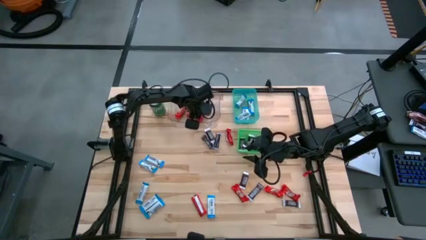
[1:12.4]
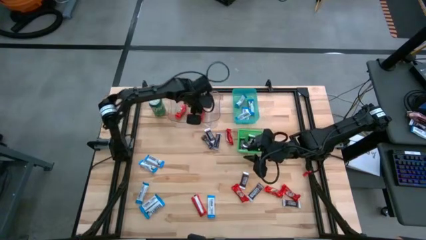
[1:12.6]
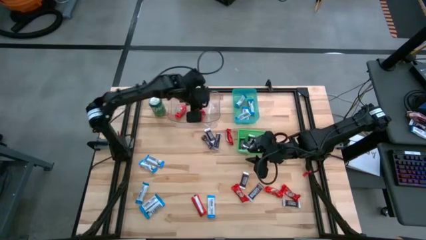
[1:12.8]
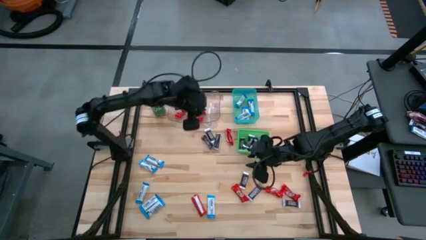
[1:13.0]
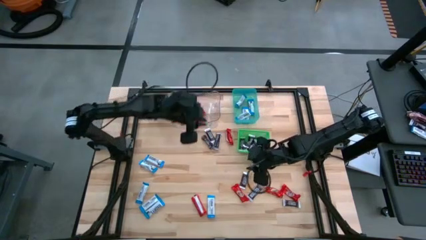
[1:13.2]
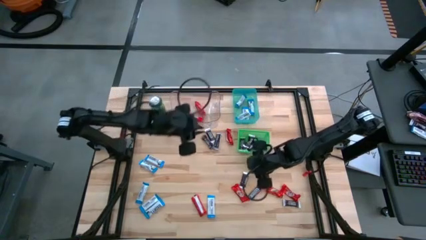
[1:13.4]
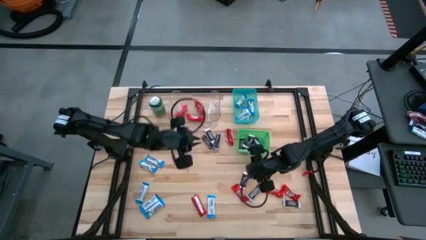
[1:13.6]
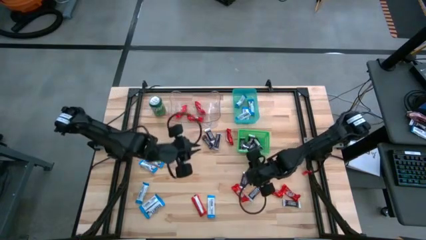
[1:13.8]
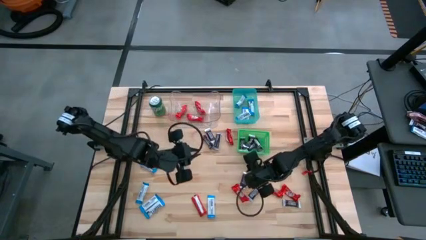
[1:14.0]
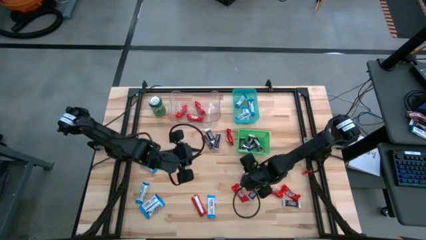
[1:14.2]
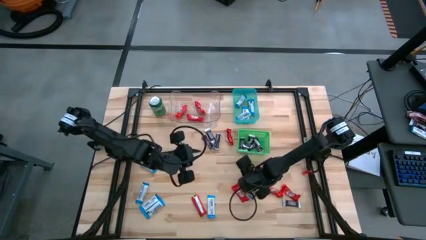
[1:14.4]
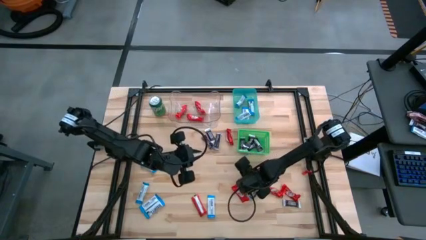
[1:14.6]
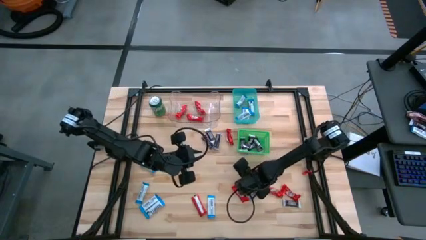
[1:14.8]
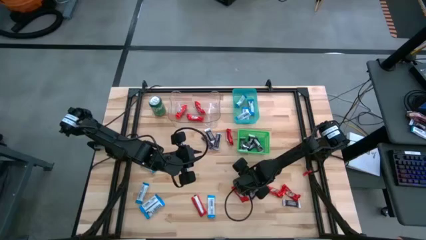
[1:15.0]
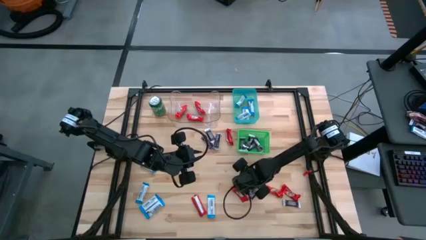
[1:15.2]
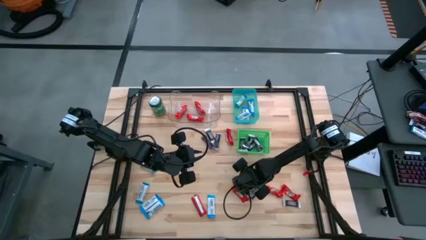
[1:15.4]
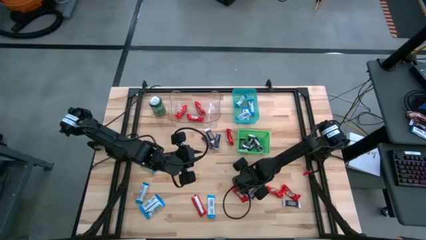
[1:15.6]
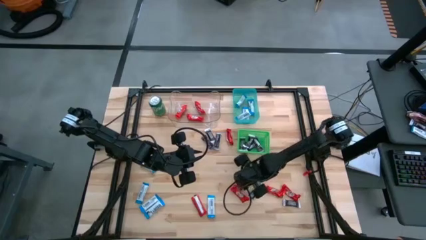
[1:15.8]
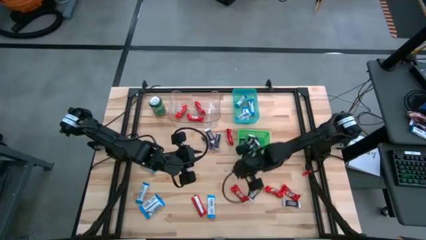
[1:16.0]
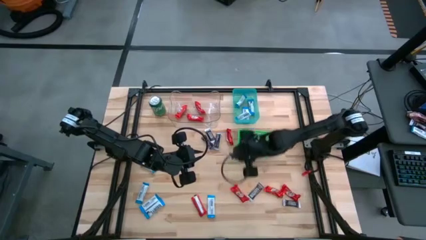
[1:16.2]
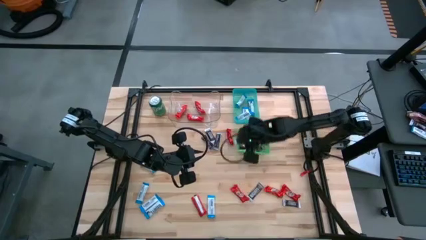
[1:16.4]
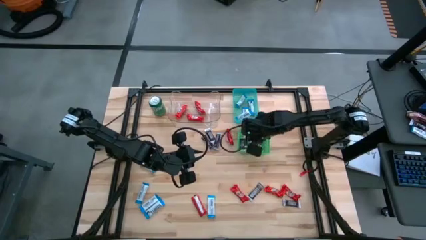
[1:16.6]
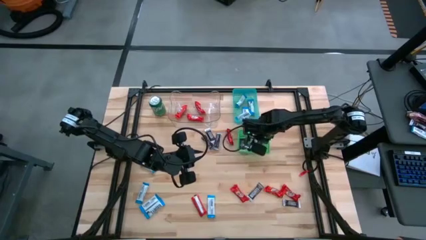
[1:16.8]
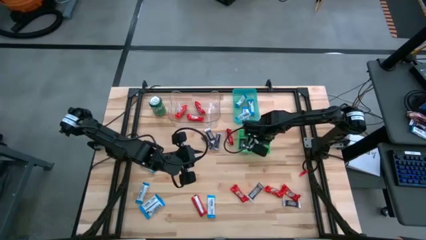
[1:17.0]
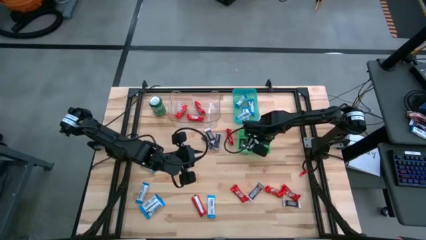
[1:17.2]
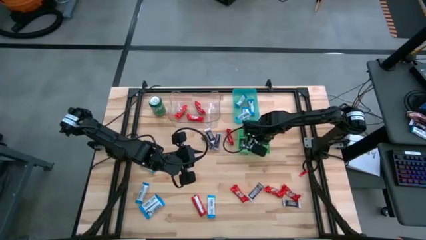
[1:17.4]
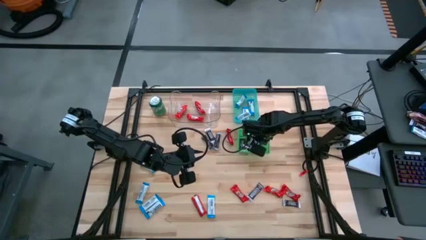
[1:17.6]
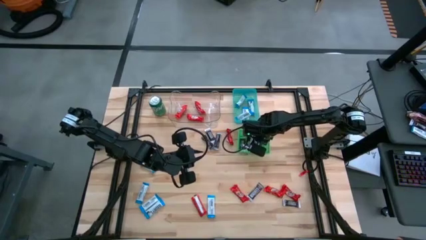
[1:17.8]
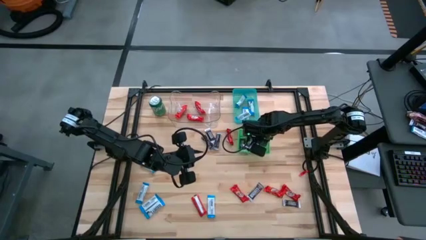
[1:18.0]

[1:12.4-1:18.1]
Task: Sort candy
Put the brown chocolate bar into the green bin

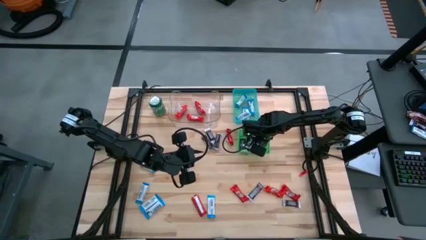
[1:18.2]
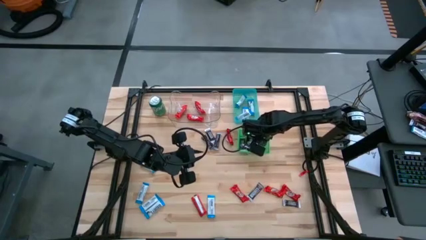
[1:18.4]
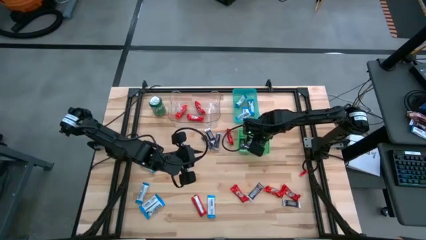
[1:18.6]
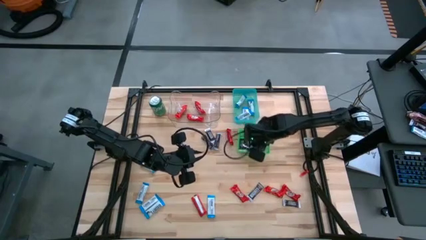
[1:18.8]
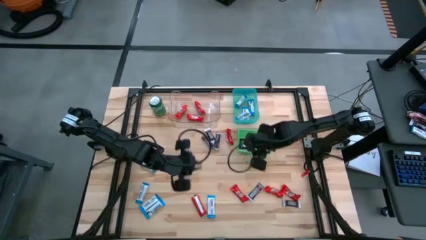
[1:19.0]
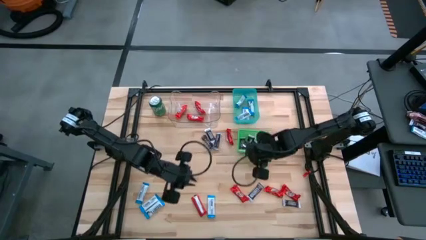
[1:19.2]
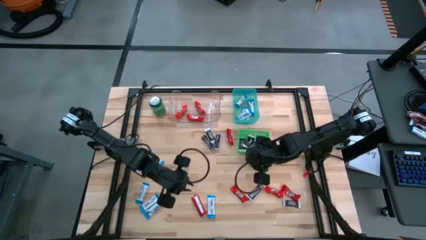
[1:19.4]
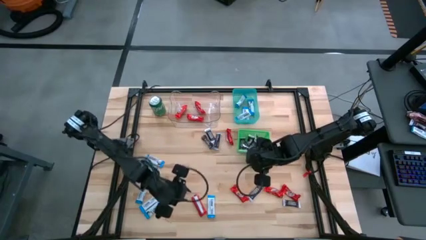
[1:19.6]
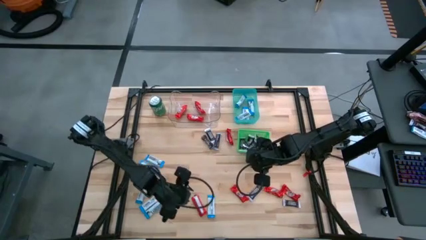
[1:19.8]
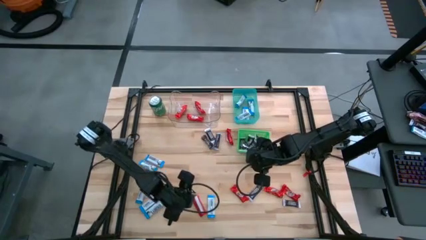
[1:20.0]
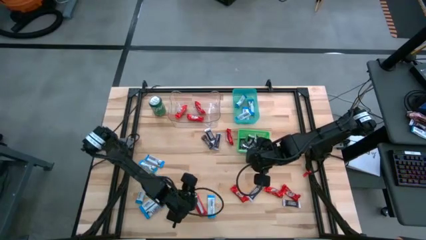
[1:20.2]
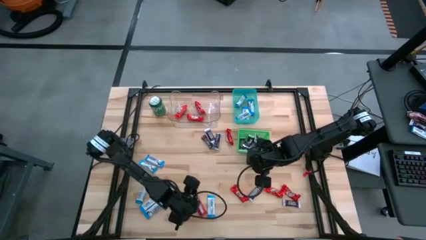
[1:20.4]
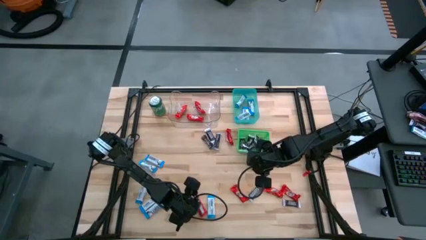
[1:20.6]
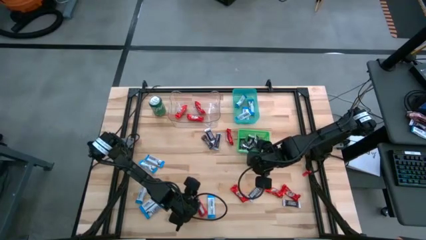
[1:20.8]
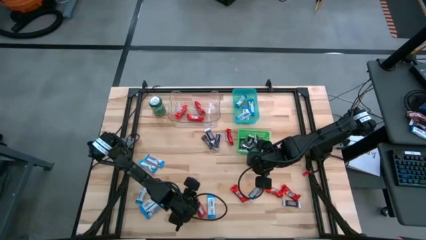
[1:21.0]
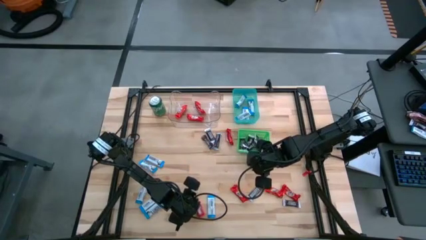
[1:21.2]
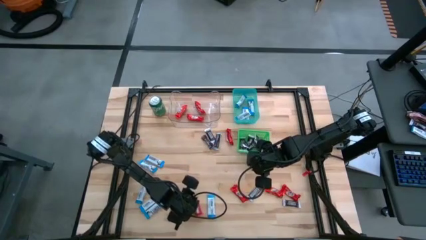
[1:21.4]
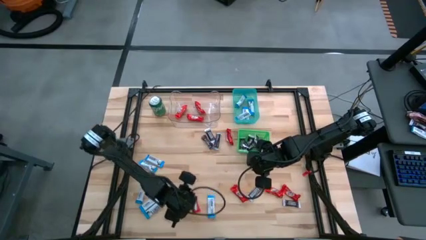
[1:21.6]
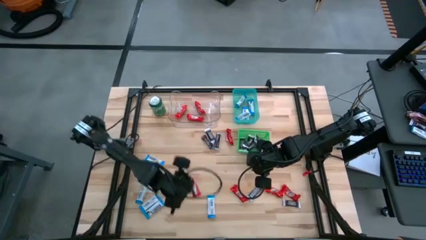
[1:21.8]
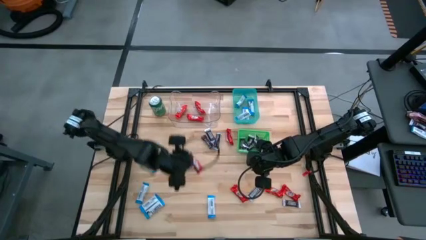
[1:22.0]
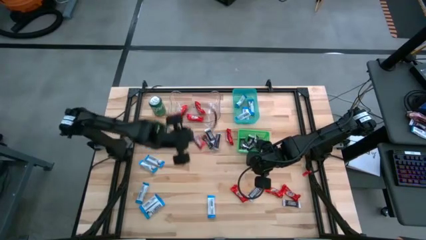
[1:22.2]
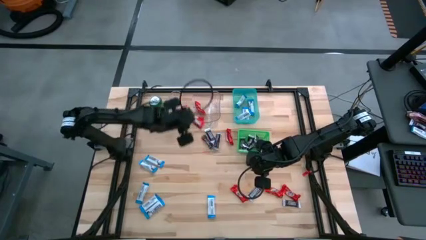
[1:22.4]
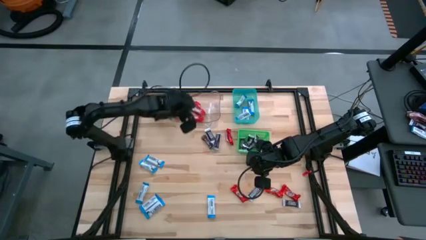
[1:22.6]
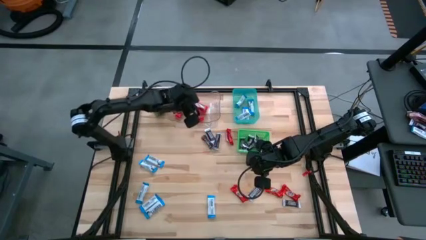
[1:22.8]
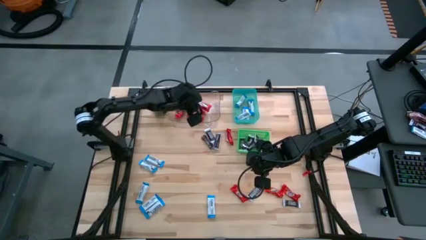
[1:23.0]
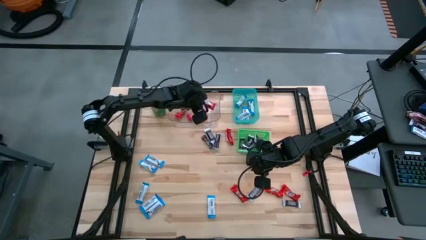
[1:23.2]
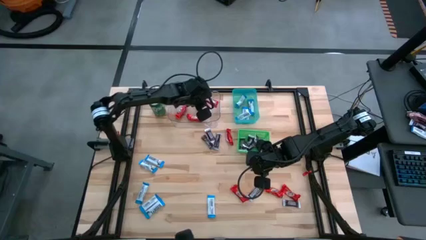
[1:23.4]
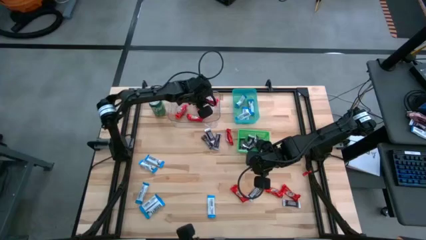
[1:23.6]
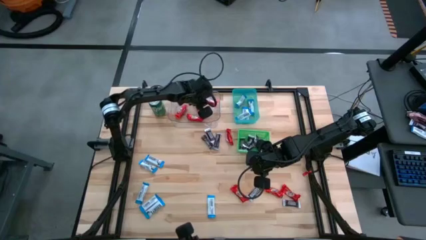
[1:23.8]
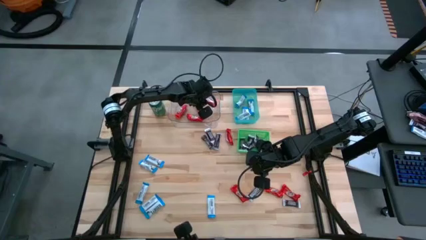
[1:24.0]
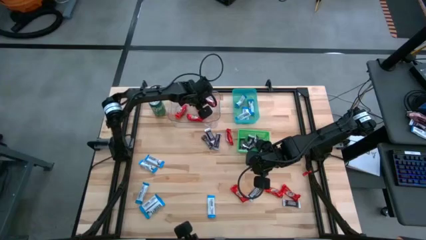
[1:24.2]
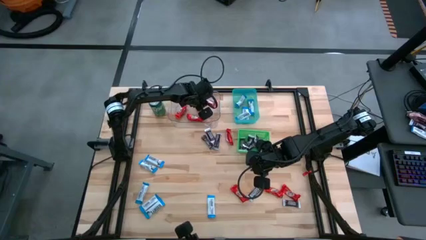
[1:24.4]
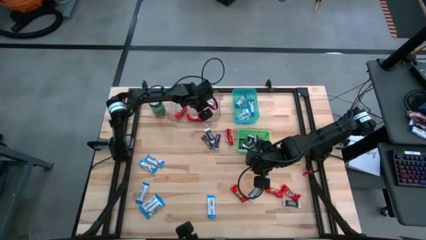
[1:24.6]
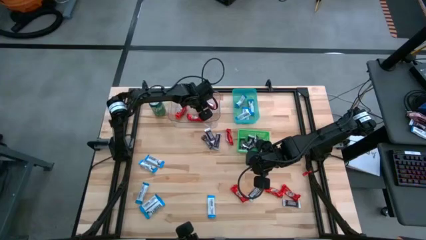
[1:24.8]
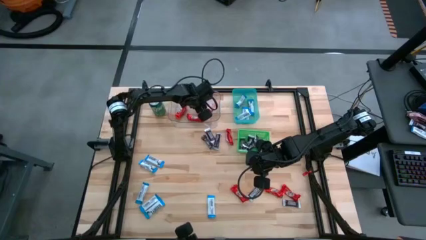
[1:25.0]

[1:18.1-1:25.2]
Put the red chocolate bar into the transparent bin

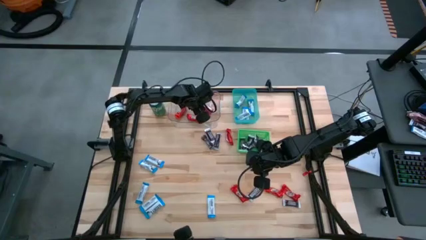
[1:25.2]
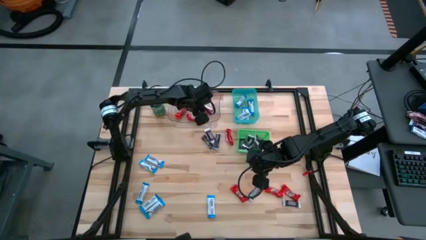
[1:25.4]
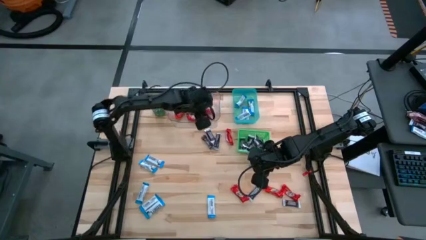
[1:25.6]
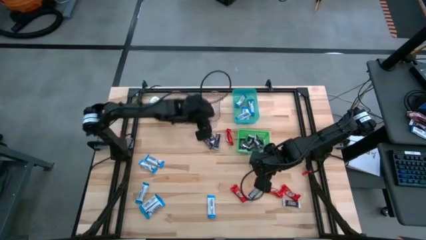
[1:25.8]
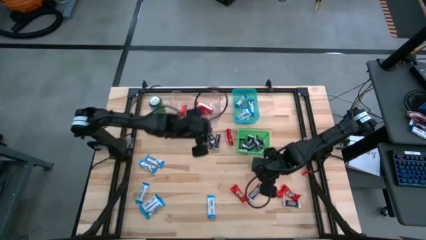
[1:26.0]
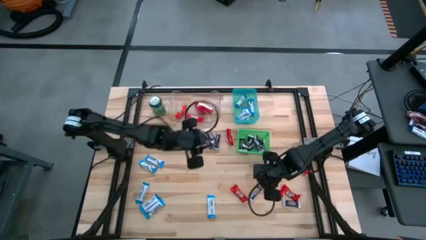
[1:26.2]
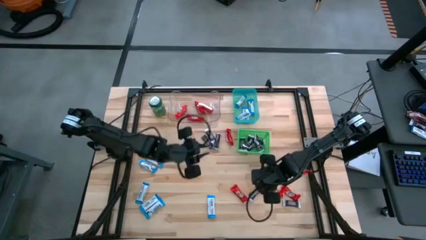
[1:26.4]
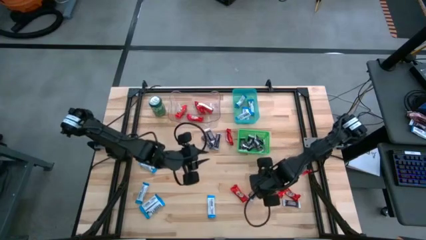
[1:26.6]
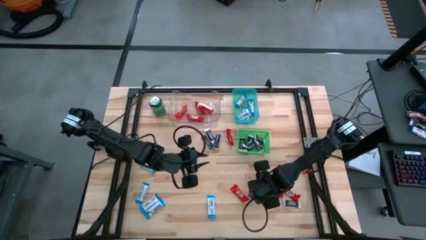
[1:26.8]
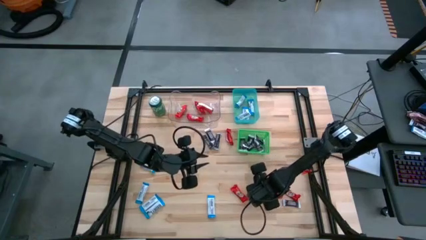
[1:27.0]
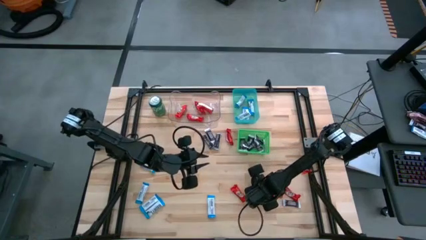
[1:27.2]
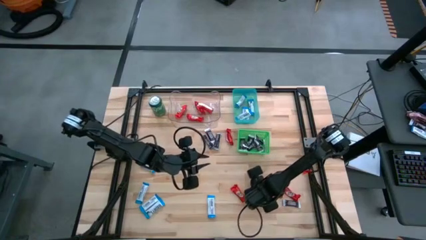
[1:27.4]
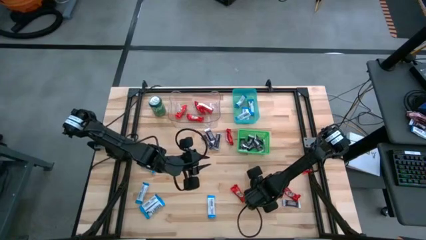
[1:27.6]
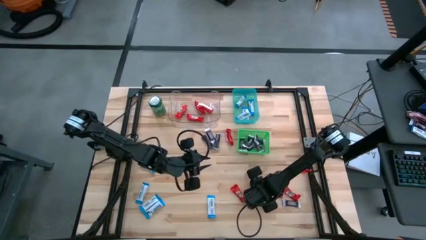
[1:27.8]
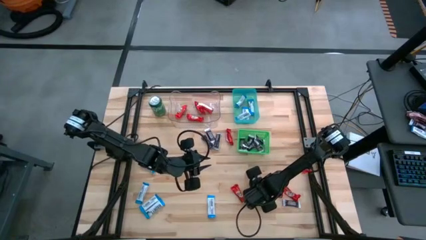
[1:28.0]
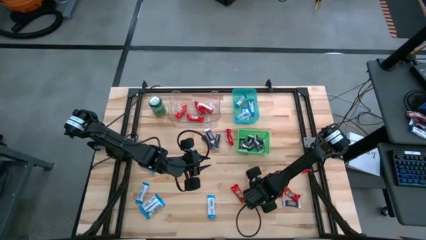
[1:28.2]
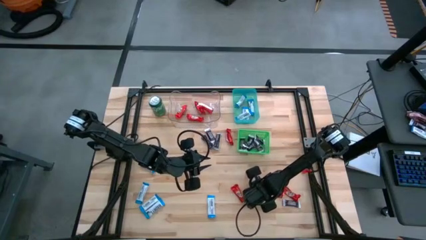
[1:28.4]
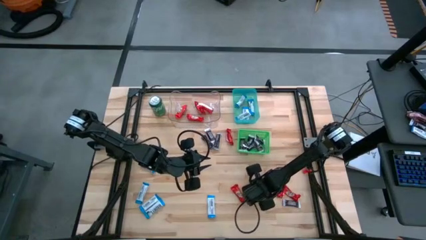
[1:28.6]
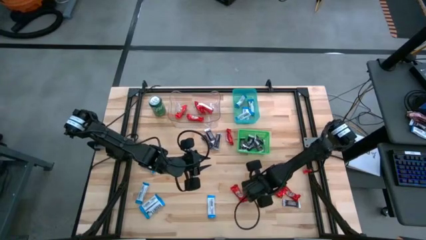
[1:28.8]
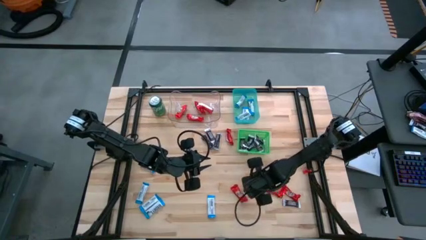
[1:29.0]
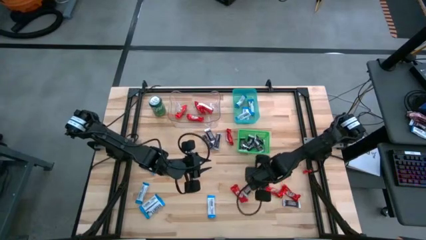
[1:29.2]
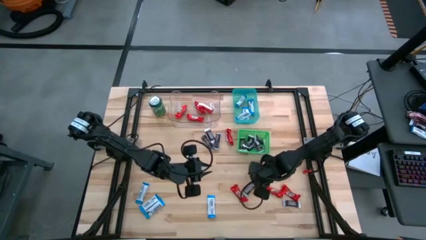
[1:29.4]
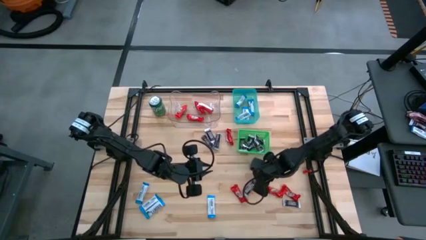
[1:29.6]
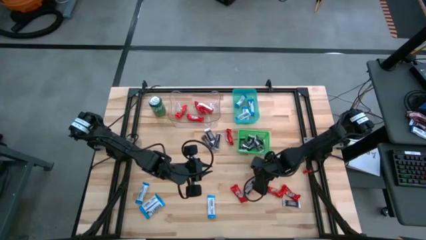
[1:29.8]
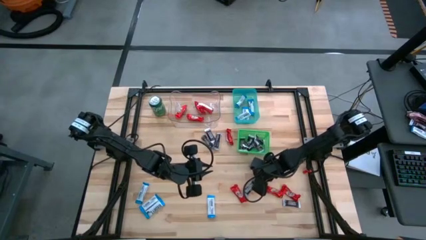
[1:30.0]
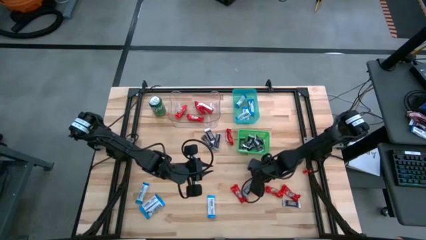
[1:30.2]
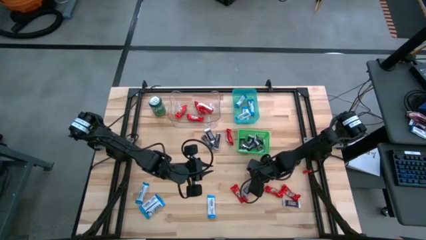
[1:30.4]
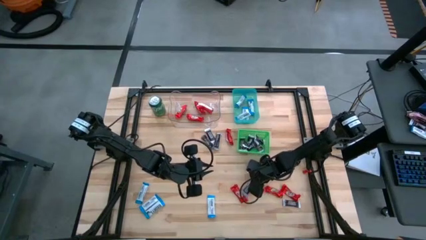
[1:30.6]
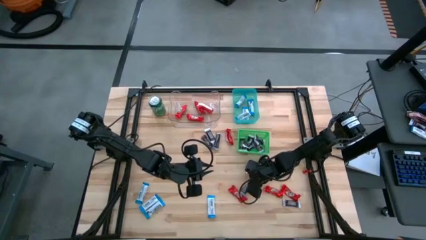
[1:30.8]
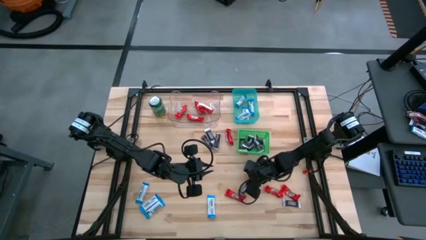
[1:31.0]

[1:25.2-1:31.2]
Put the brown chocolate bar into the green bin
